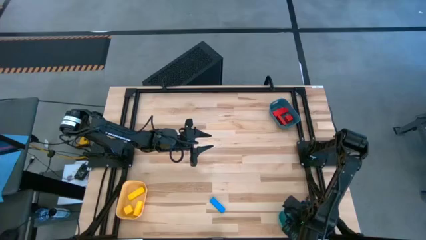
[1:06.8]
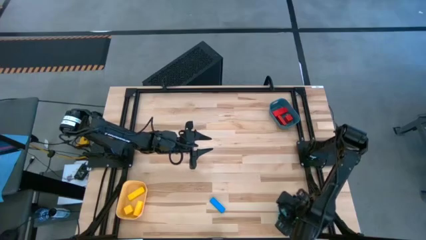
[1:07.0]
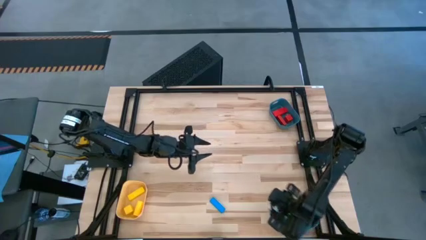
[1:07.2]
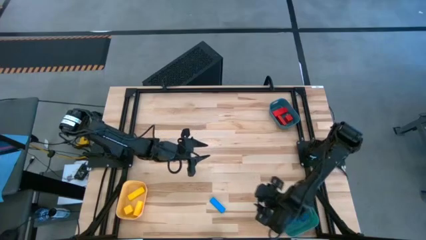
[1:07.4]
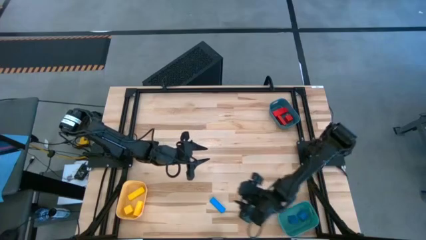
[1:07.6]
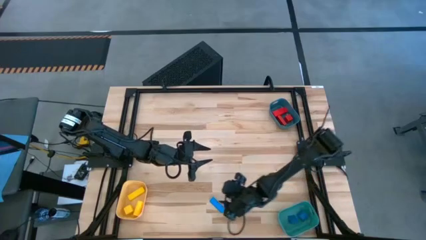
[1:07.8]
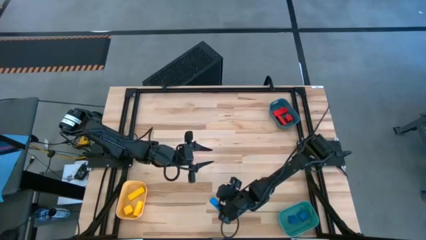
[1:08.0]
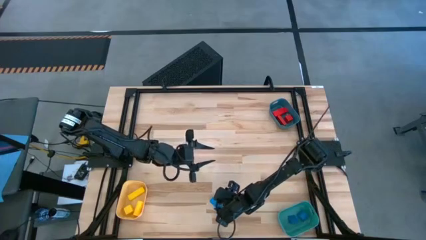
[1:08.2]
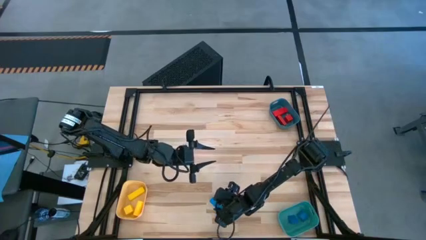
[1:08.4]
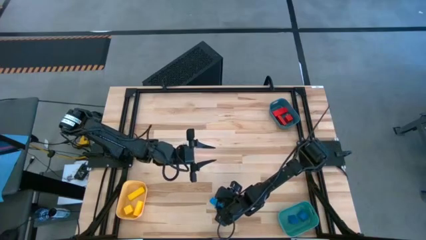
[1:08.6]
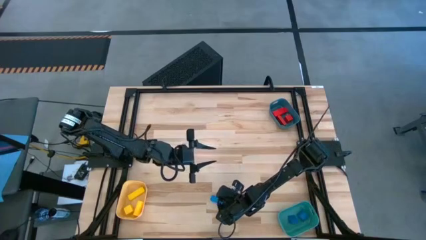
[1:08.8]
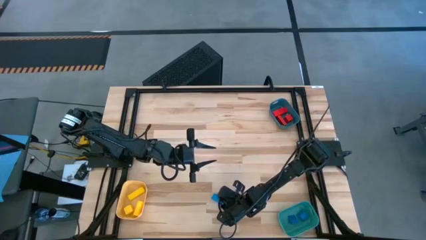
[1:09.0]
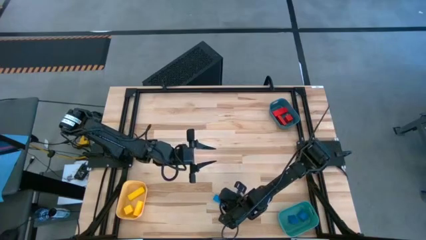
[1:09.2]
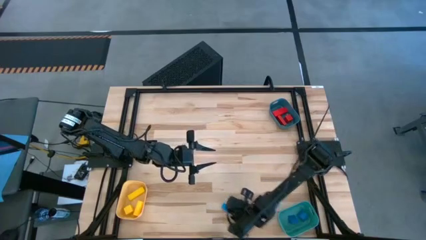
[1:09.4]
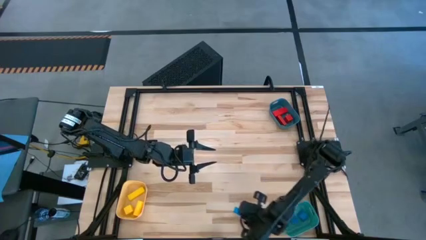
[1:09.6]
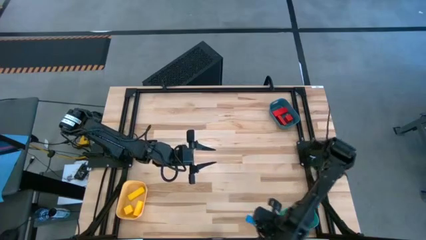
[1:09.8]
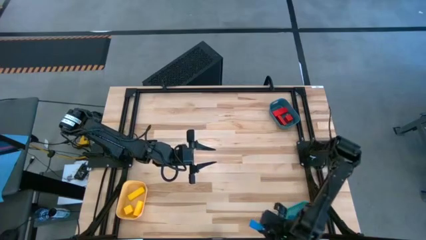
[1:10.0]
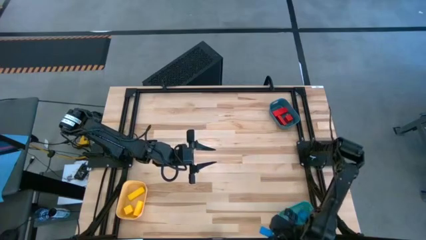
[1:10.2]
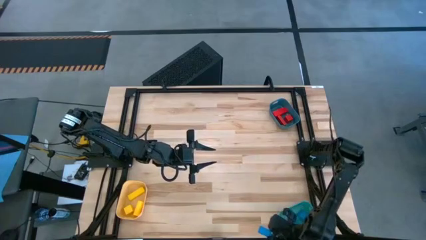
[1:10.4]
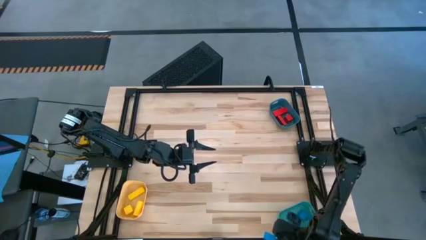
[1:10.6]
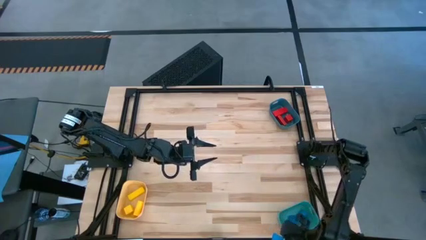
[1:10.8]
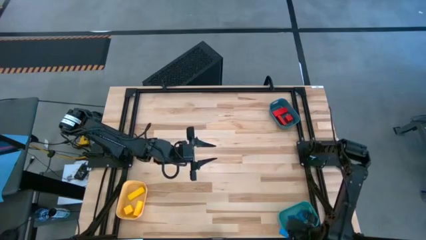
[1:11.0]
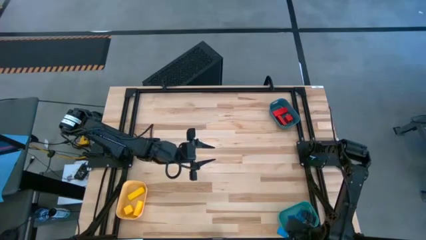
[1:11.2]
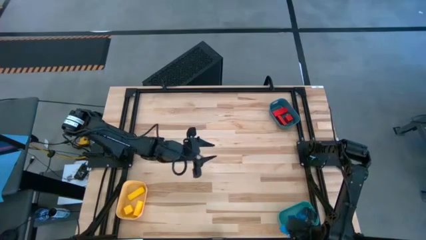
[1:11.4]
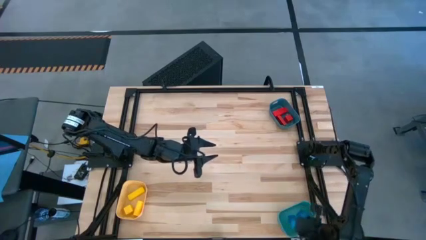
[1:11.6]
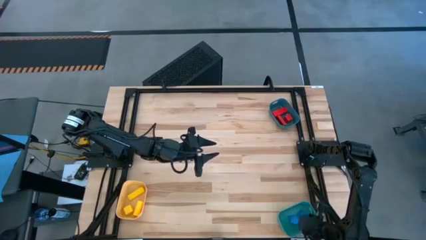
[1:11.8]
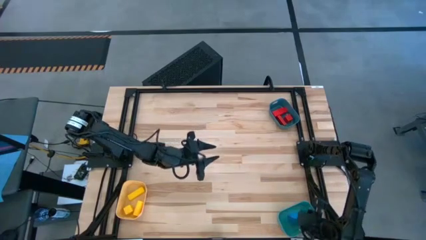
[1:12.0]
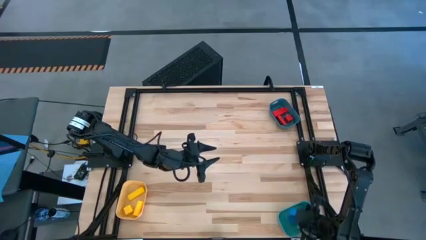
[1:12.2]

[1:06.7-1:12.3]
Task: Sort & place blocks by color
Put the blue block into the green bin

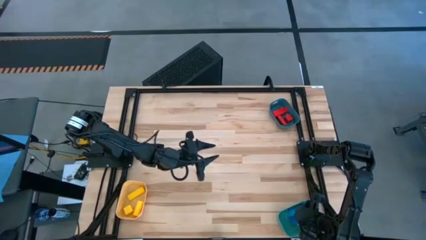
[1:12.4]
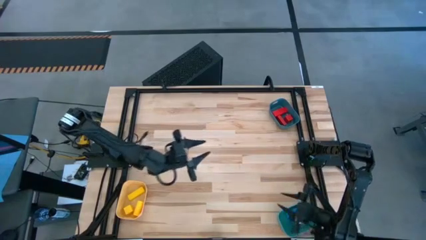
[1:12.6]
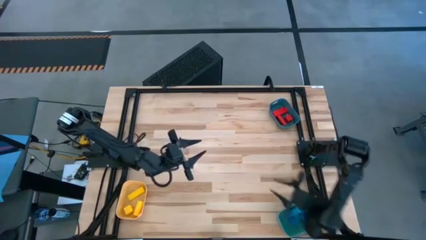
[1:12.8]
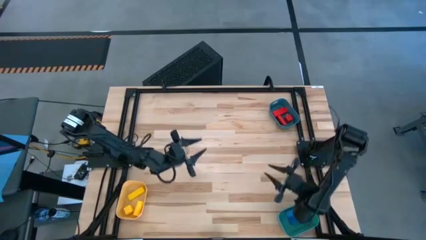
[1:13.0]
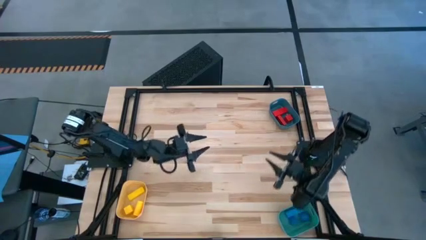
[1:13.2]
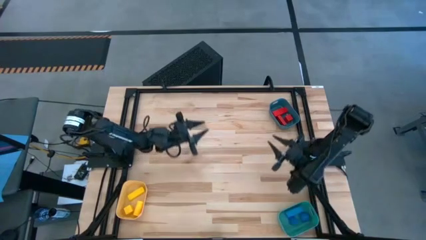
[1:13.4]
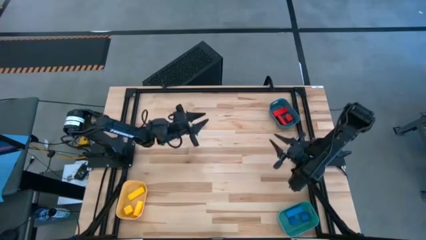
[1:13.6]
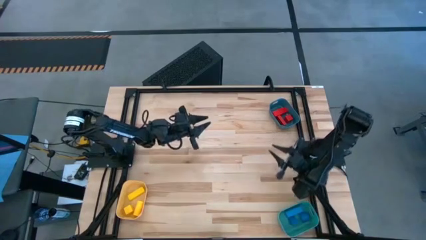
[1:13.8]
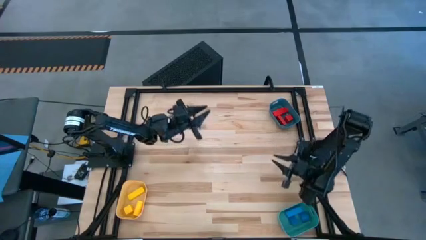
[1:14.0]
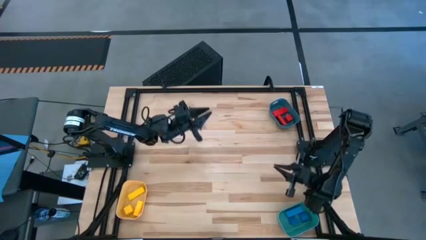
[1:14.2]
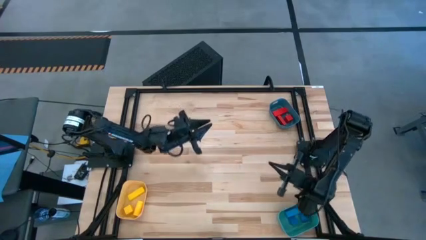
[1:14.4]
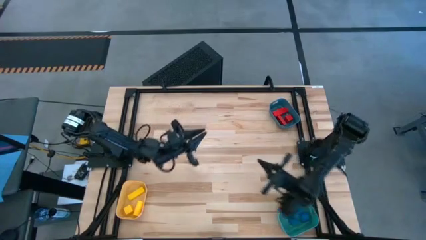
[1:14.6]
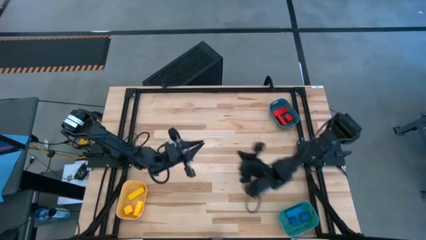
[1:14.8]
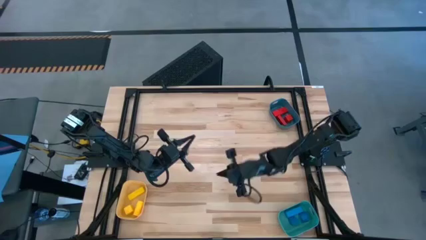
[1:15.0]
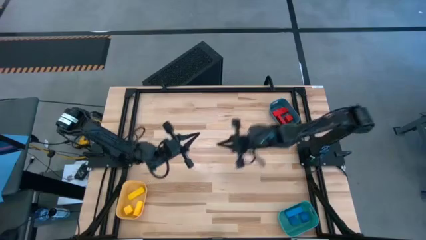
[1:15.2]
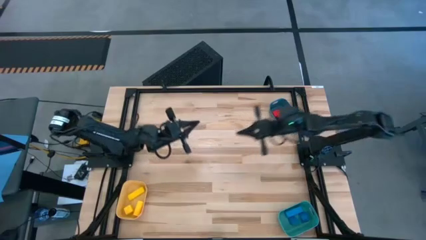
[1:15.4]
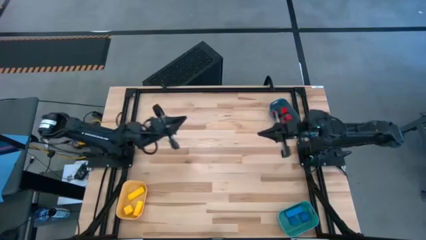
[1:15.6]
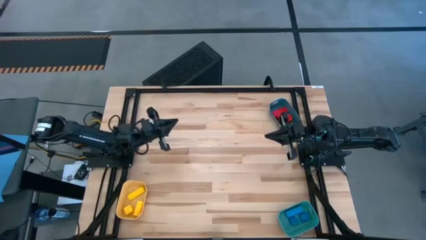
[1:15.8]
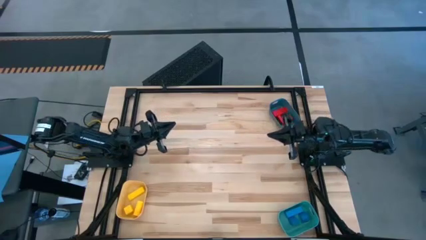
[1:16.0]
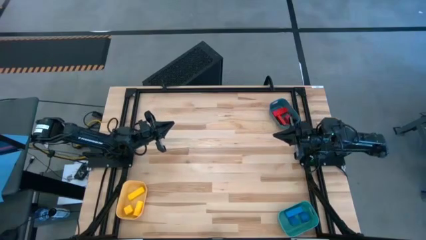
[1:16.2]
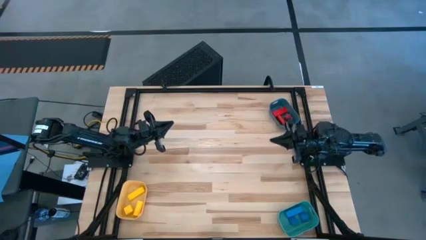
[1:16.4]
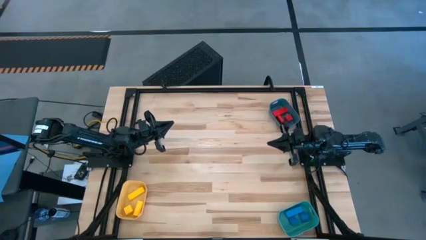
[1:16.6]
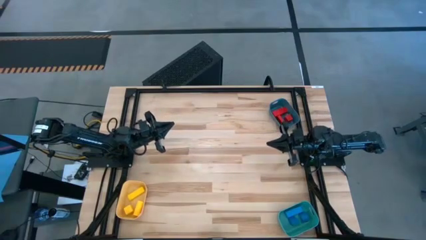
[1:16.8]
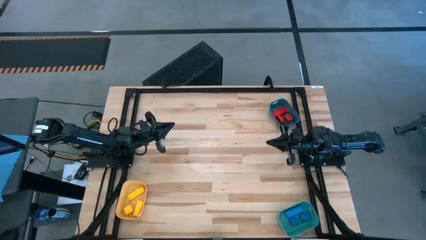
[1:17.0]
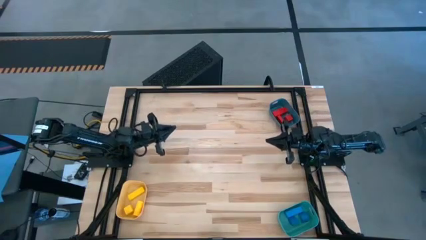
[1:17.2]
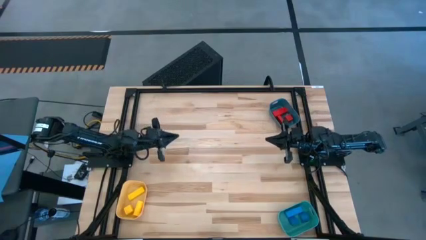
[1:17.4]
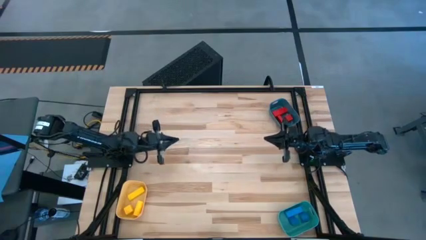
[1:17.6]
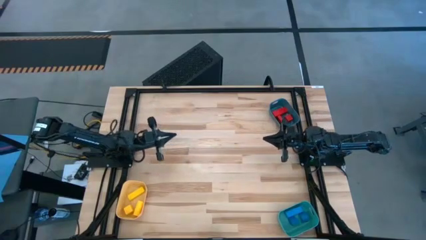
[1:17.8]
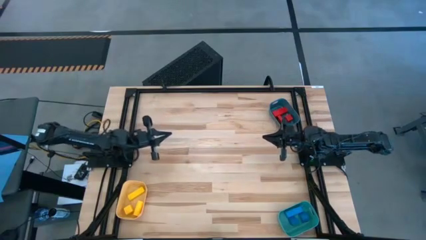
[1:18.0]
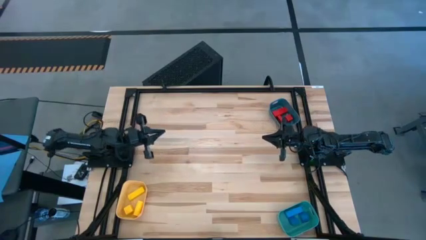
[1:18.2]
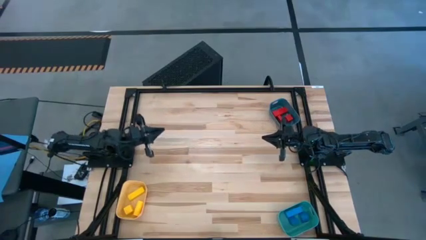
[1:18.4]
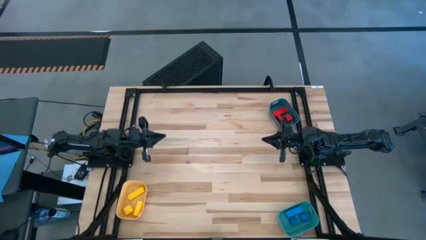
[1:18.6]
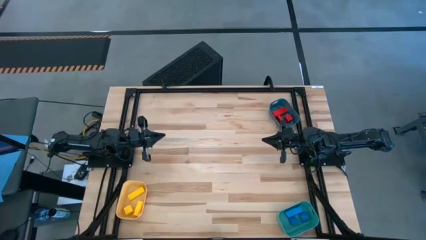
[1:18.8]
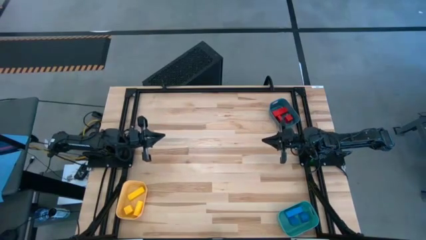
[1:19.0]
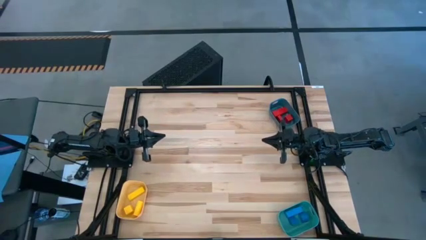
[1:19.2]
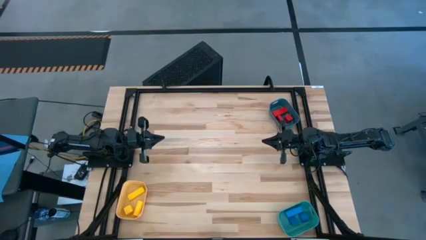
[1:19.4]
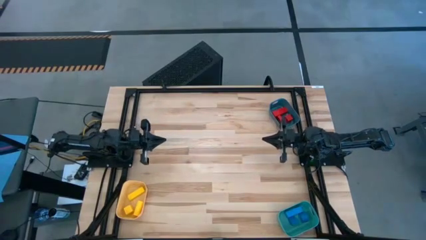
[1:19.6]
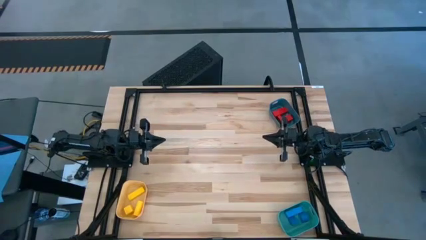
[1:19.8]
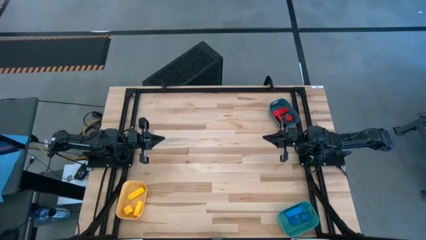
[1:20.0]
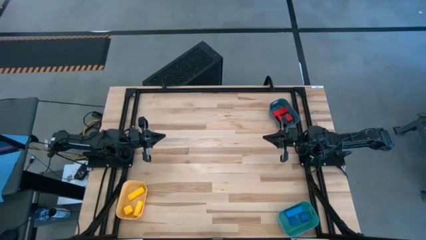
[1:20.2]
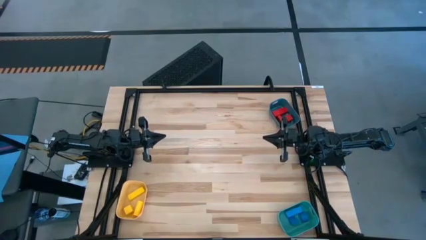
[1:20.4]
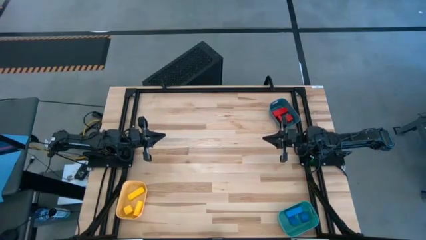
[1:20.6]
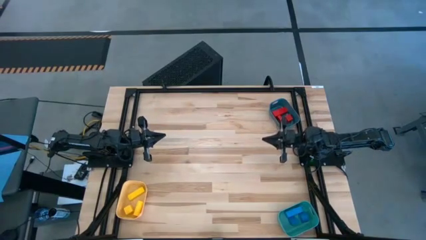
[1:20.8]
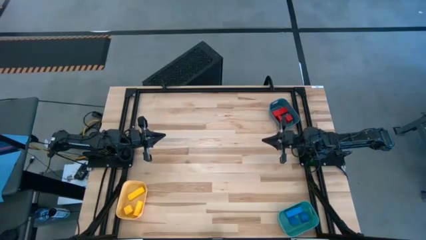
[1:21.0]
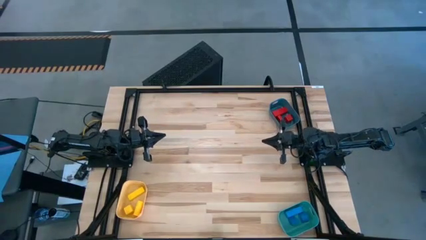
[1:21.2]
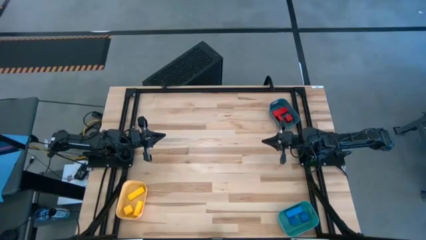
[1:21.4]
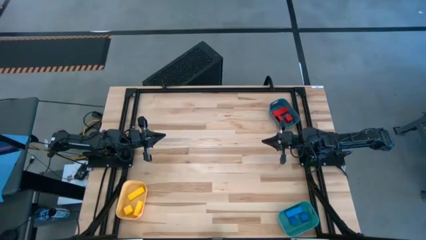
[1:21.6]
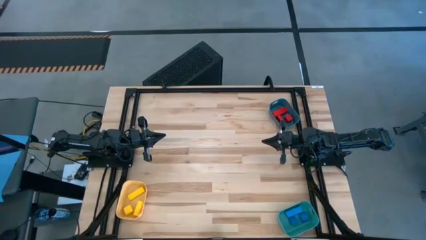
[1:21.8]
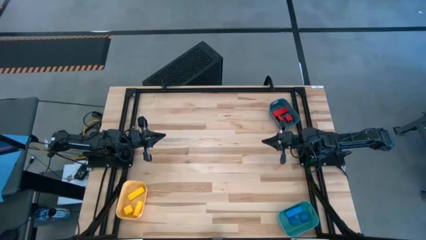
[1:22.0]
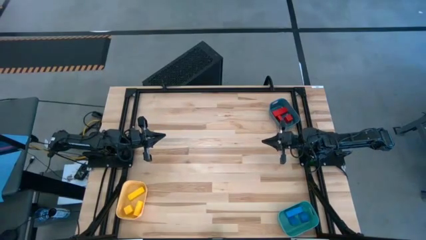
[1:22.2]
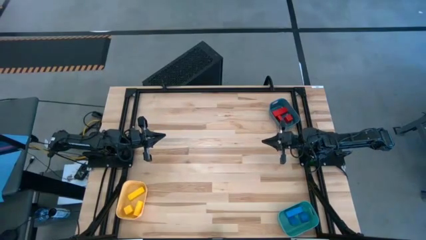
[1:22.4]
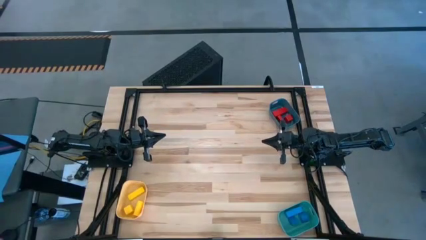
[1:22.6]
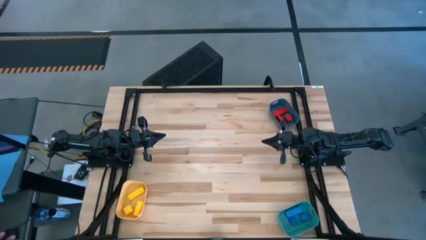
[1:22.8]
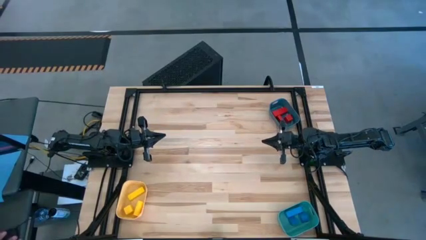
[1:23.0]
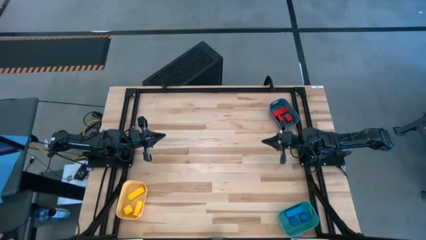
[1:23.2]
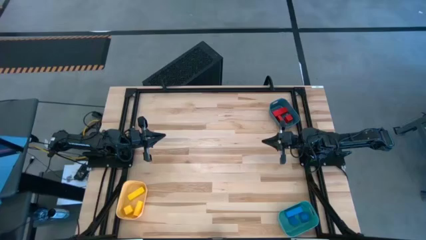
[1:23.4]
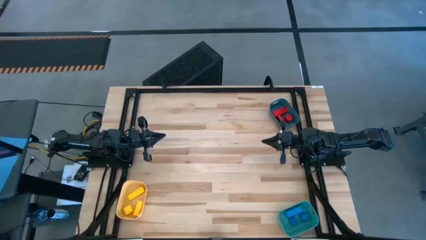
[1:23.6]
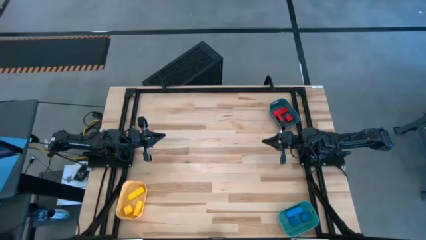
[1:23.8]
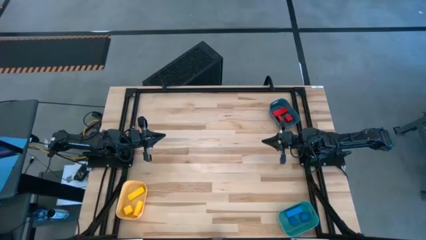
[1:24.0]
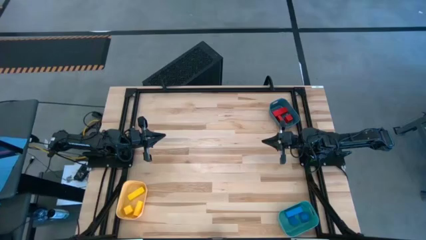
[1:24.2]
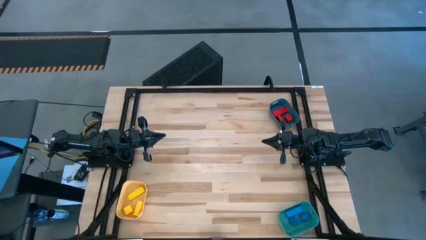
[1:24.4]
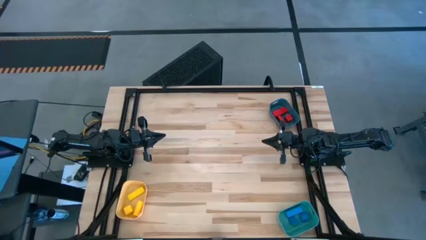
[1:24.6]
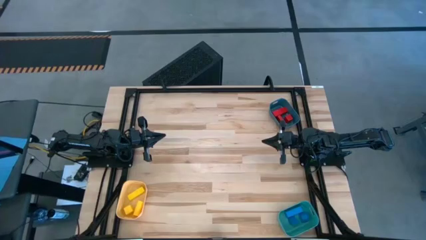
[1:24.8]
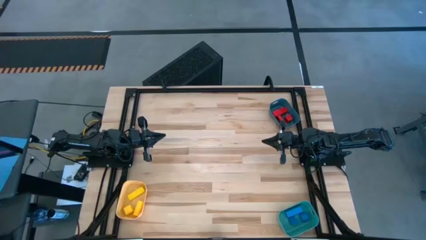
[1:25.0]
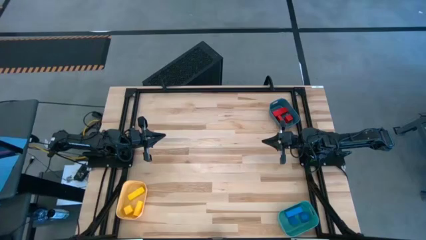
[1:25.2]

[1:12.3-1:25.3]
Return to Home Position
